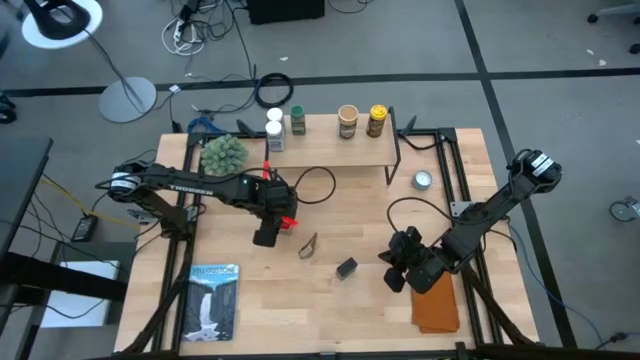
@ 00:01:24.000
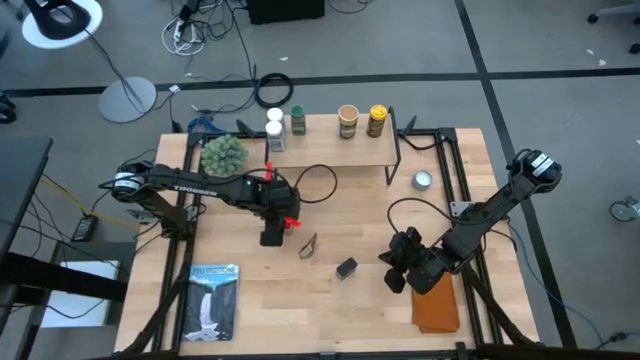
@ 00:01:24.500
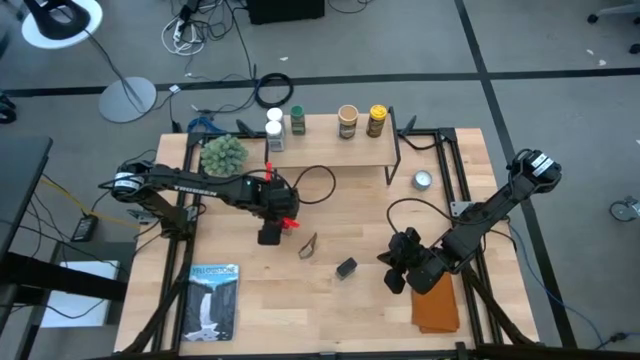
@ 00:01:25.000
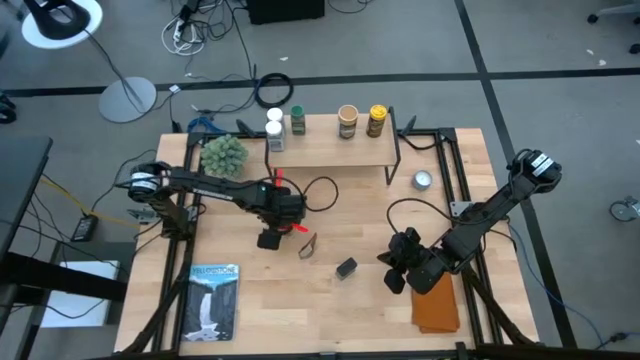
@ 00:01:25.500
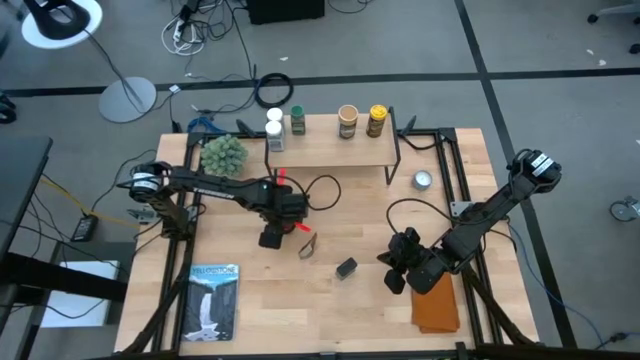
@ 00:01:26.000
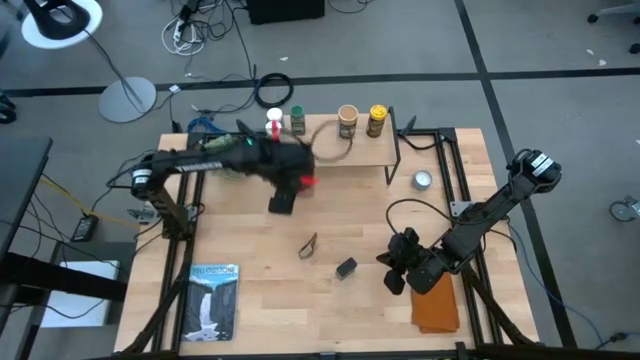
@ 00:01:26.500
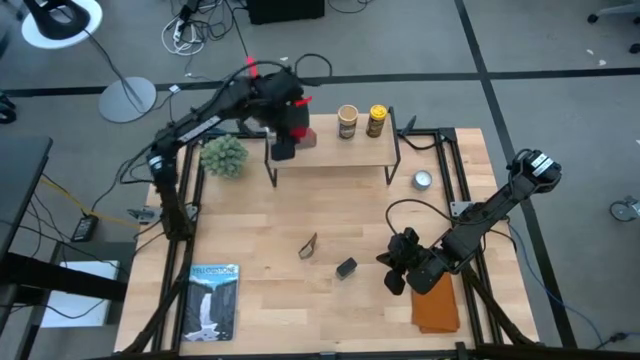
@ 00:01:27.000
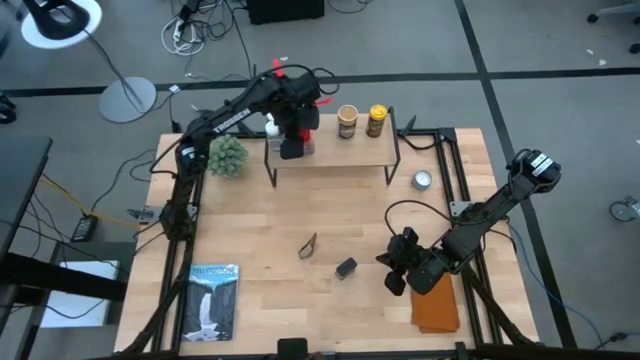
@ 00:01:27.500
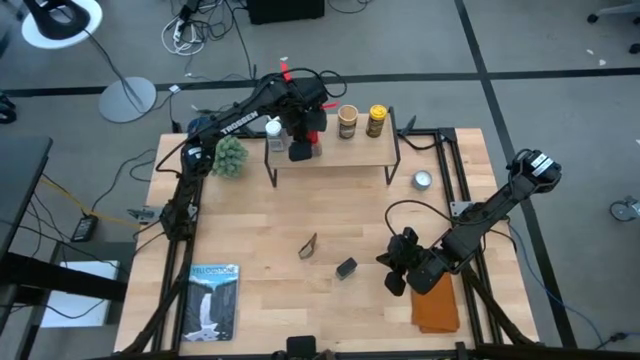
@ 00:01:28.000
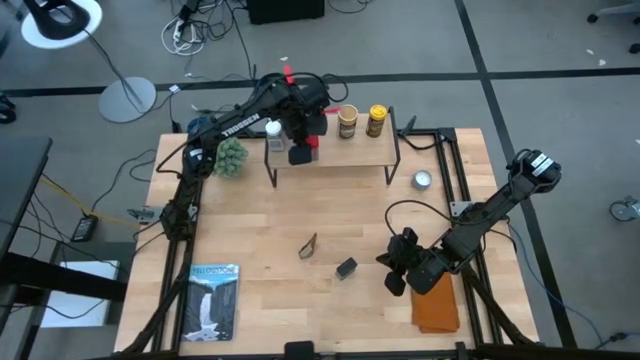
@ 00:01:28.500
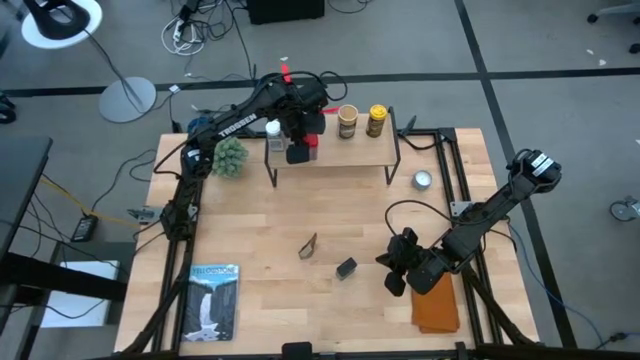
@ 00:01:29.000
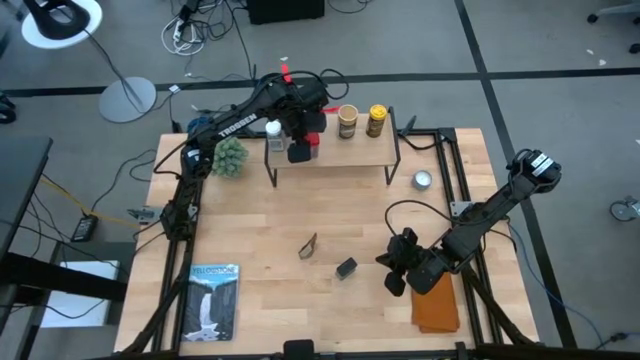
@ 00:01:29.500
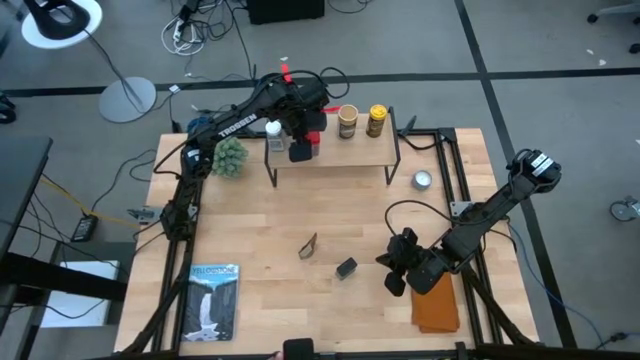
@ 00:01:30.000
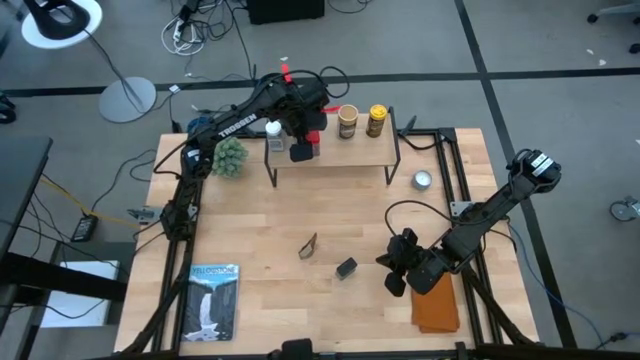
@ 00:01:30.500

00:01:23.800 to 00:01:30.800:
Task: Shelf spices
Put the red seasoning can on the shelf

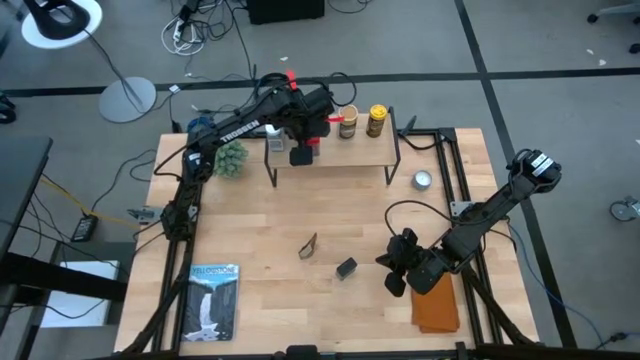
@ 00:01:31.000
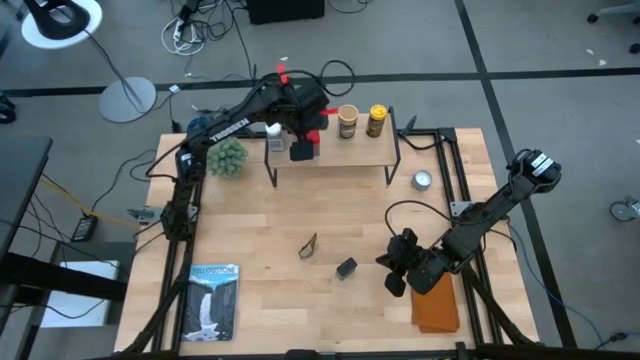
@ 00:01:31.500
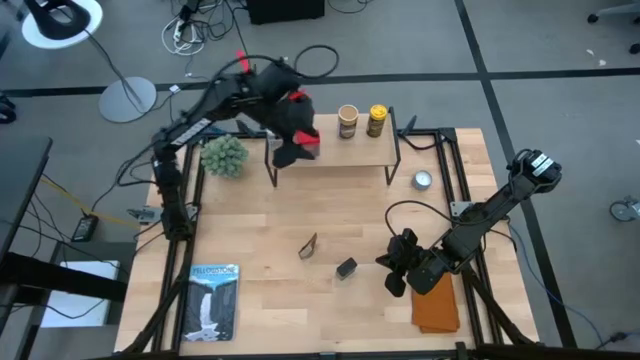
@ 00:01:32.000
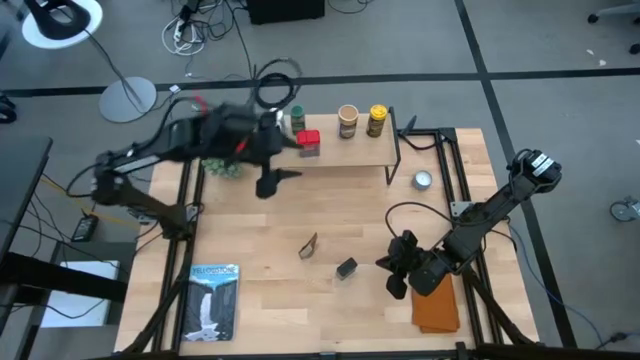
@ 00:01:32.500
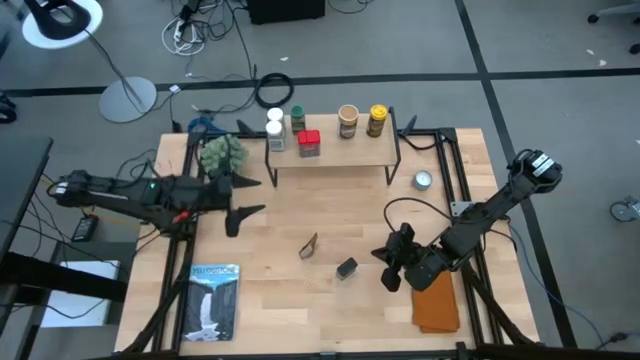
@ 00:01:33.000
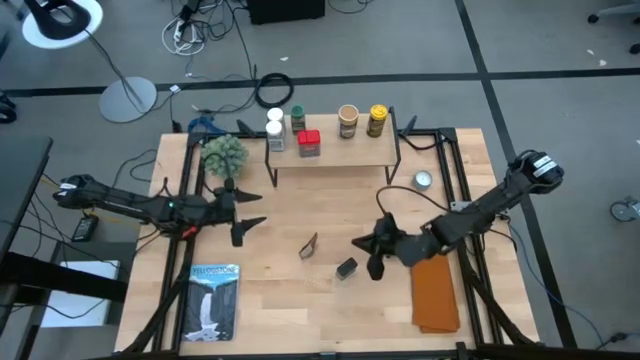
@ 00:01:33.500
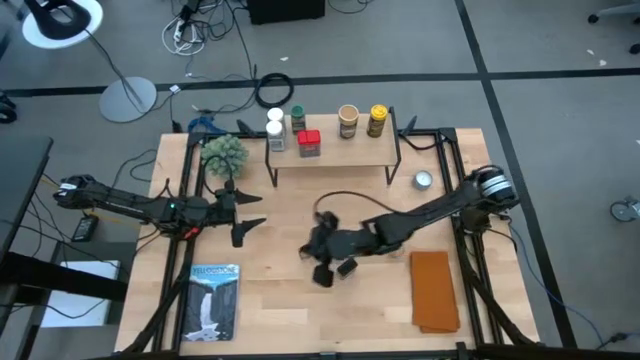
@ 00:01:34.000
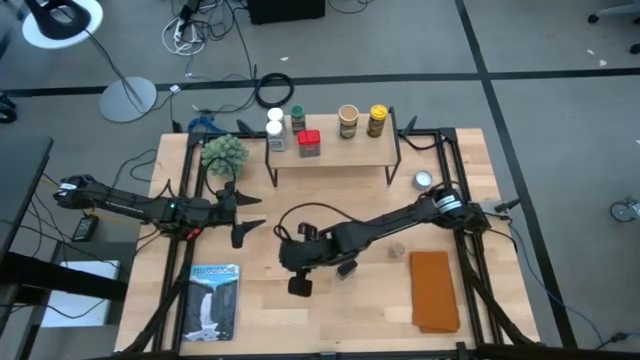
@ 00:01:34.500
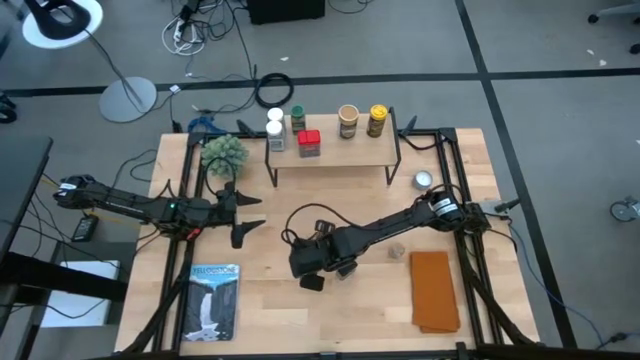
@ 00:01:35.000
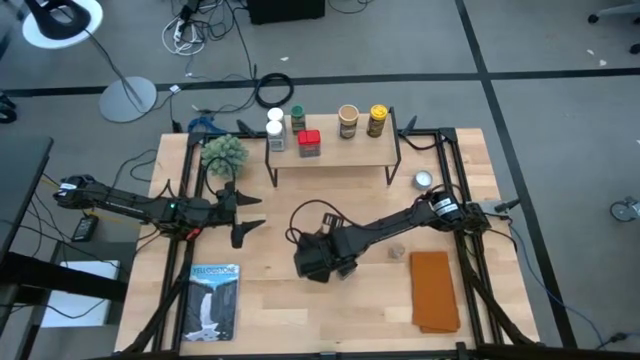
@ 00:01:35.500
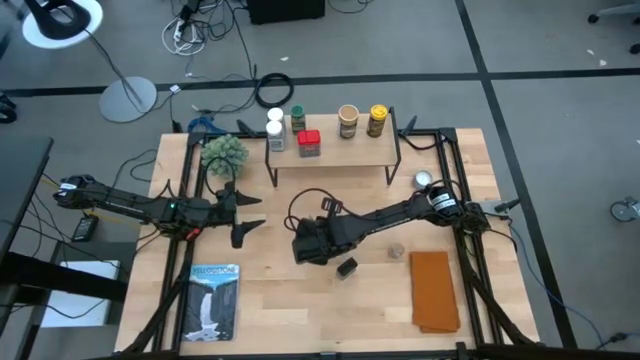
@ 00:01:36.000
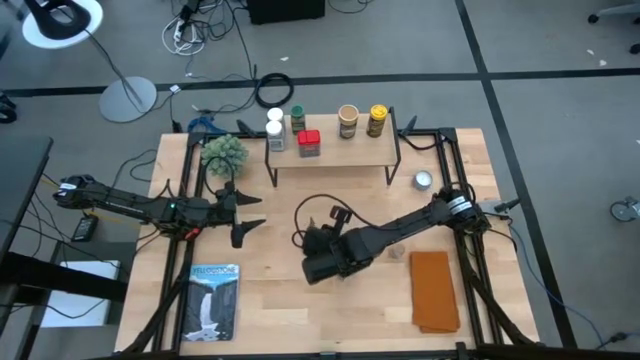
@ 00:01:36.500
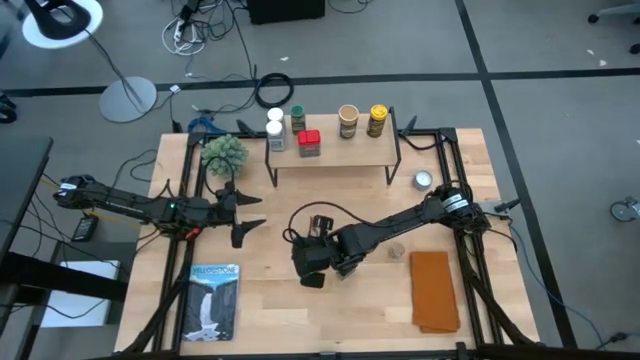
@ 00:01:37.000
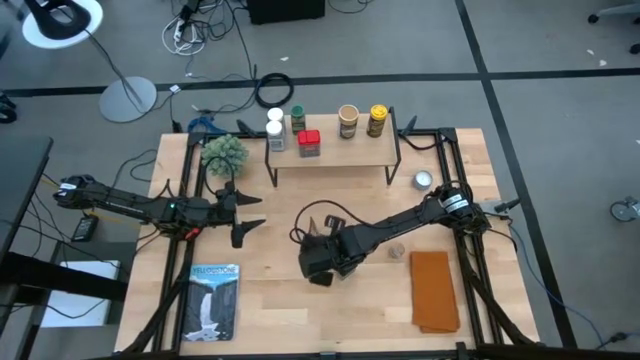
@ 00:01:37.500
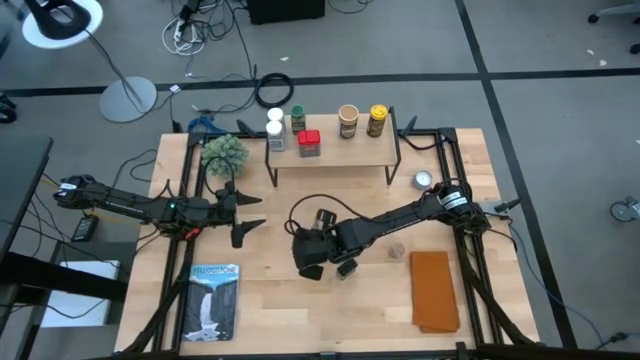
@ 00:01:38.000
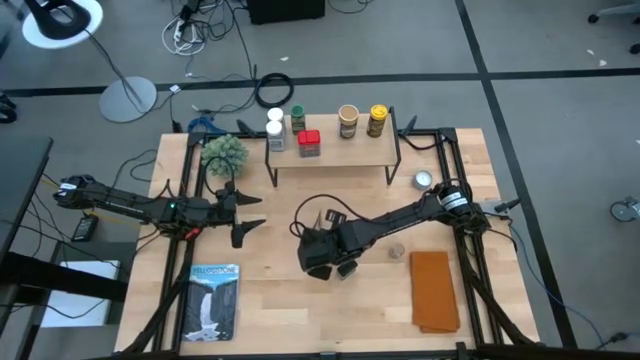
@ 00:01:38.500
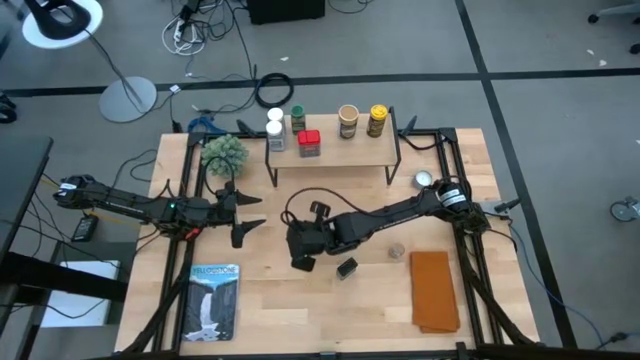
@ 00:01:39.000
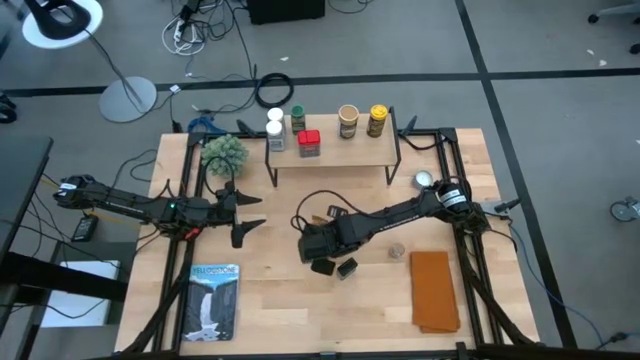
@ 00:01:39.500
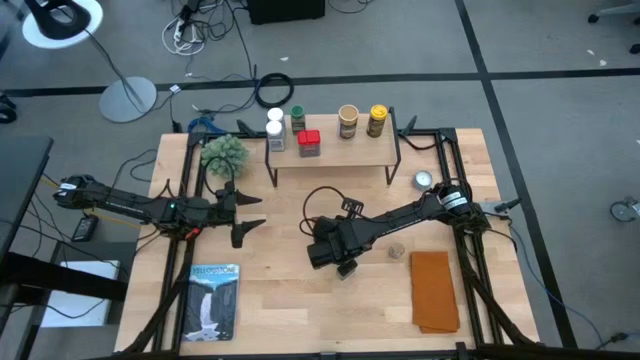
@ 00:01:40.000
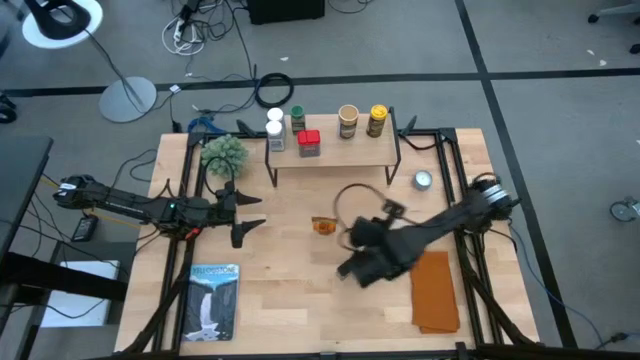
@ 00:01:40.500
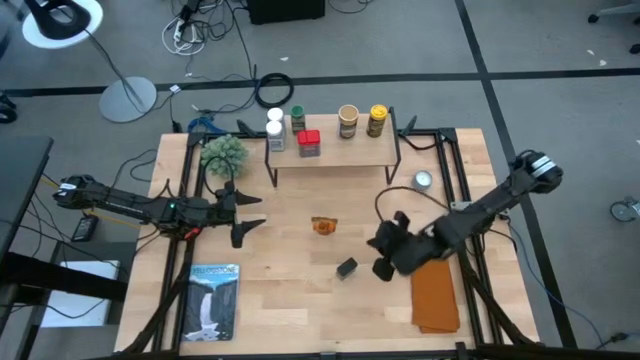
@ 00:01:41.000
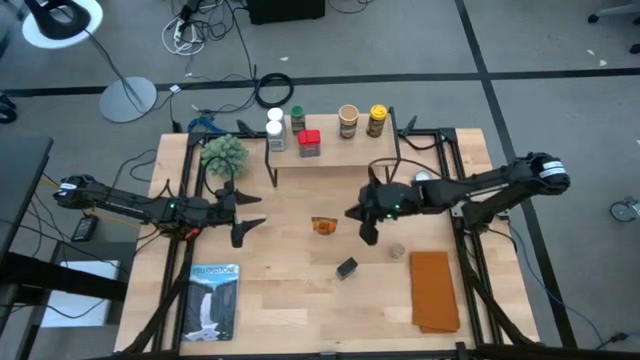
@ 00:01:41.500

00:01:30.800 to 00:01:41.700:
Put the orange seasoning pack on the shelf

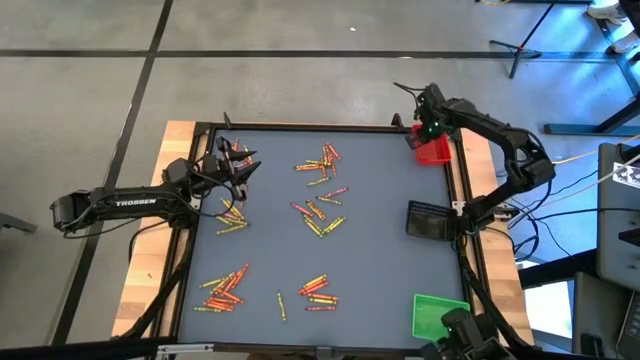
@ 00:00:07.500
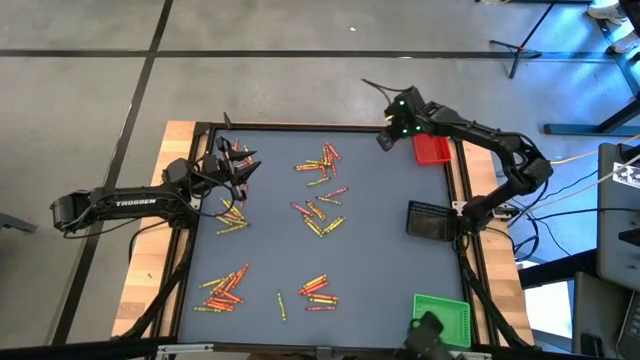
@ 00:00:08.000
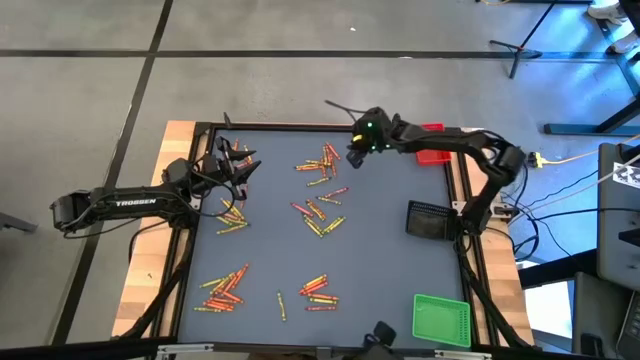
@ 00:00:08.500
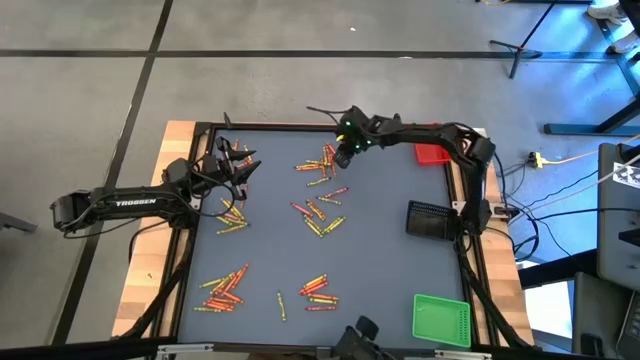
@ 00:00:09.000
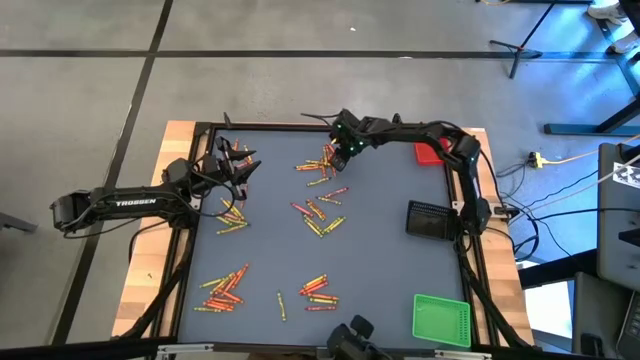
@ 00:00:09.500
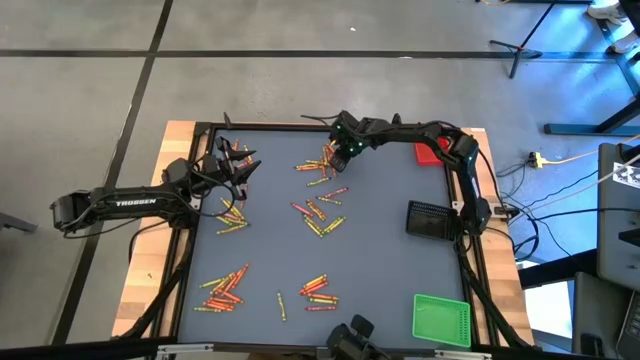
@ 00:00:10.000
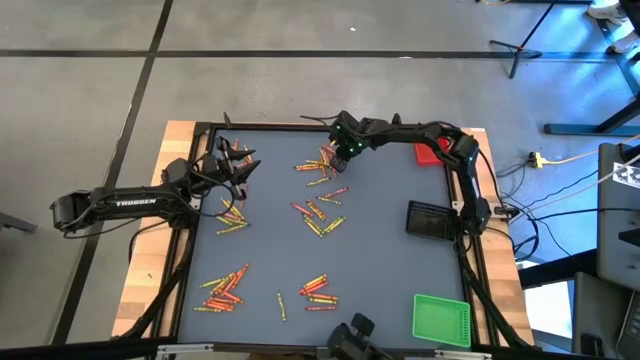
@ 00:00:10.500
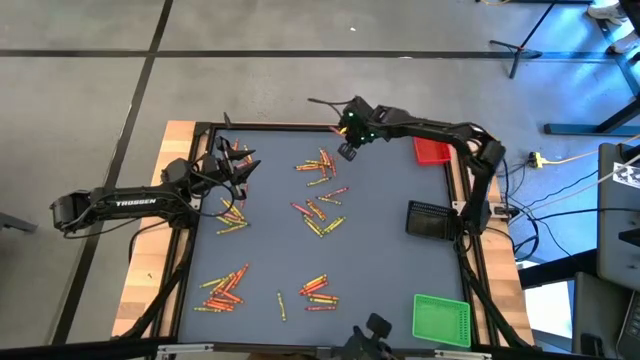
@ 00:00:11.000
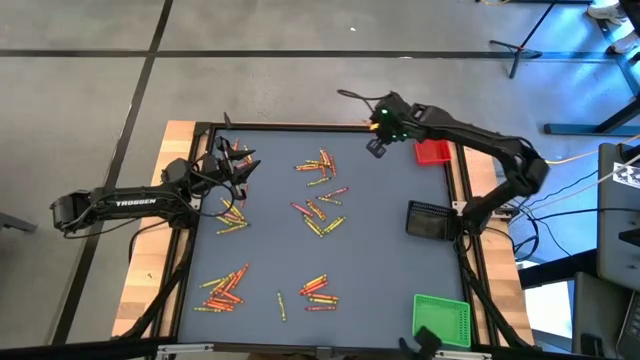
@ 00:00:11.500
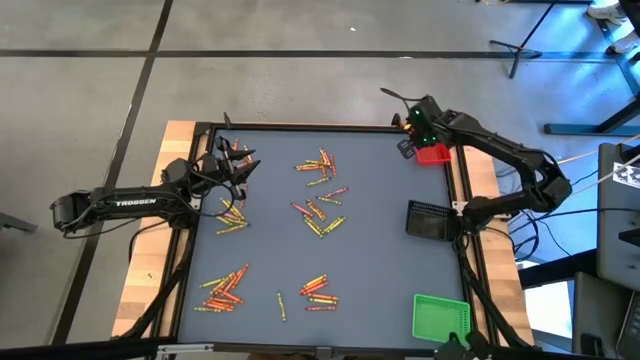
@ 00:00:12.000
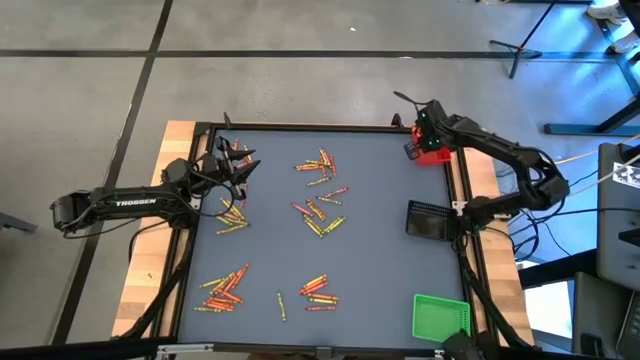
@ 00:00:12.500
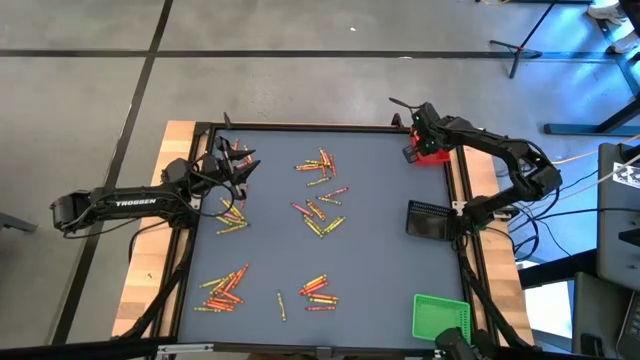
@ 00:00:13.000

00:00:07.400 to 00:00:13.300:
Task: Sort crayons
Put the orange crayon into the red basket
